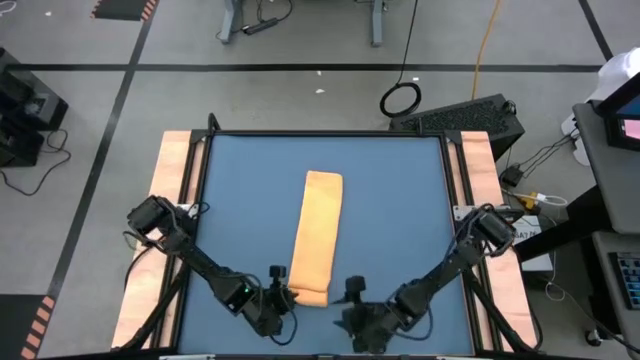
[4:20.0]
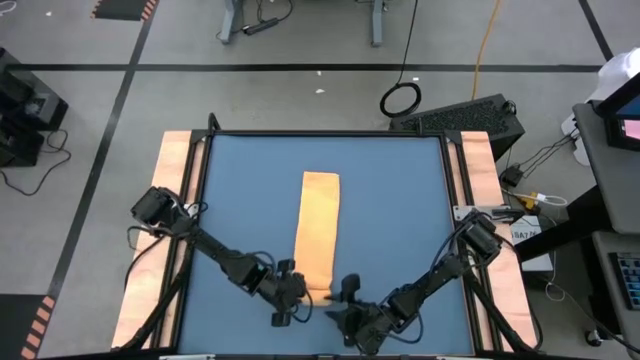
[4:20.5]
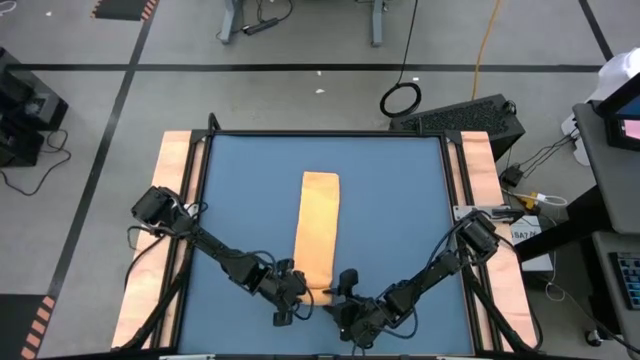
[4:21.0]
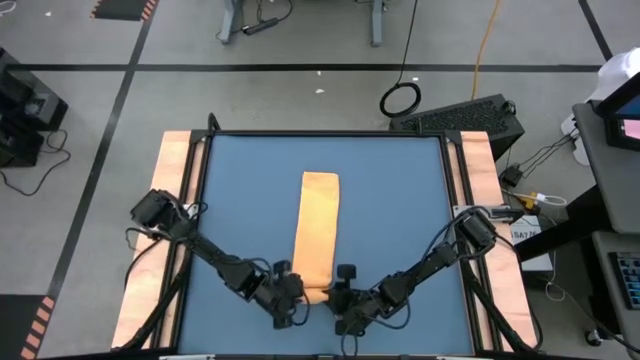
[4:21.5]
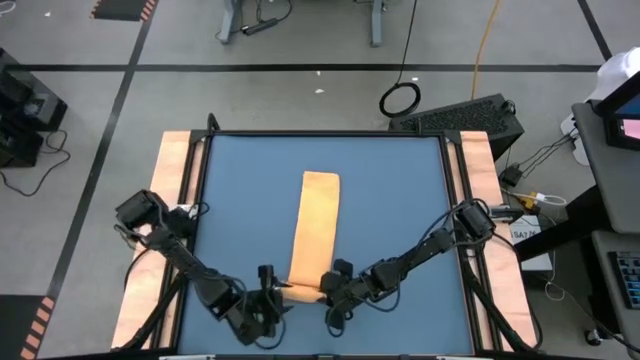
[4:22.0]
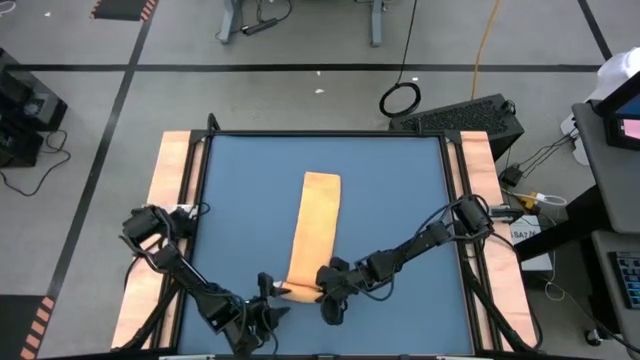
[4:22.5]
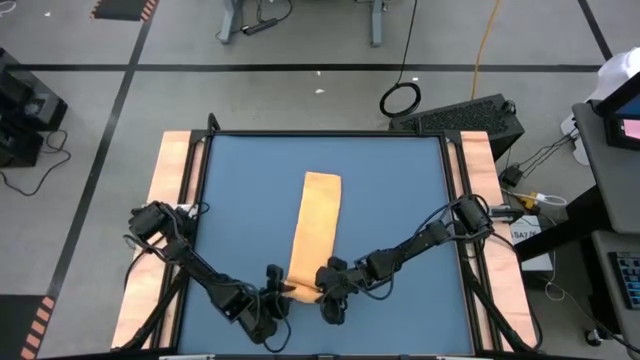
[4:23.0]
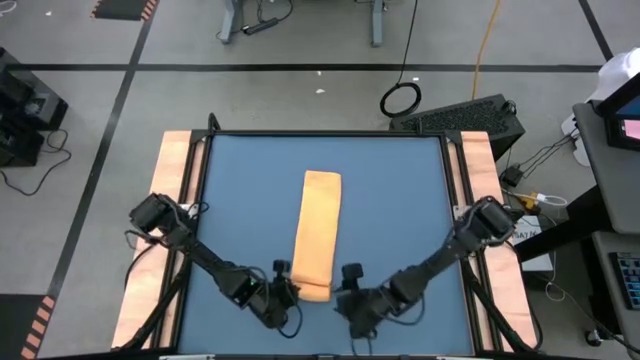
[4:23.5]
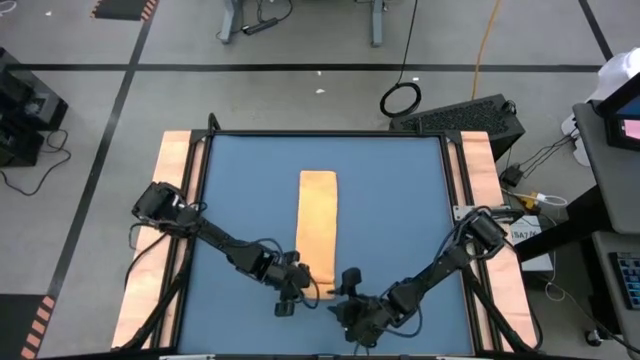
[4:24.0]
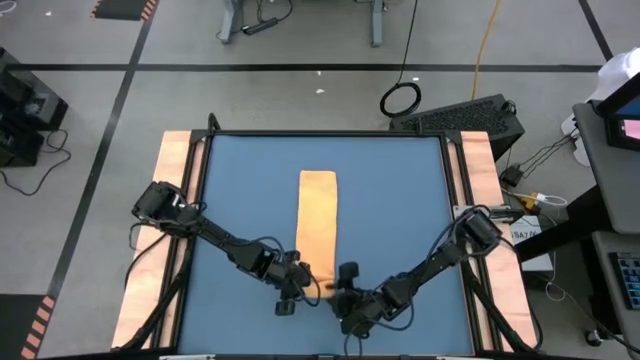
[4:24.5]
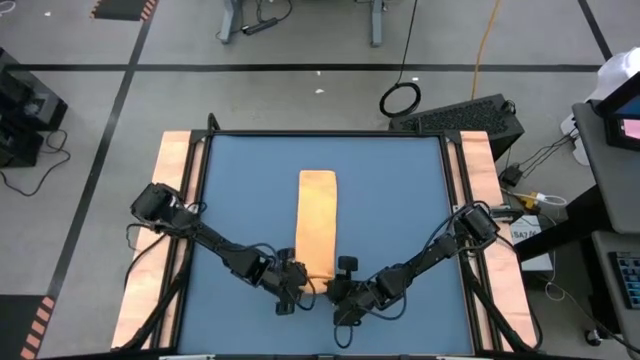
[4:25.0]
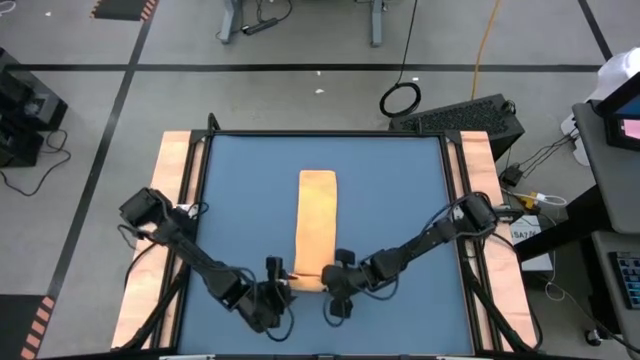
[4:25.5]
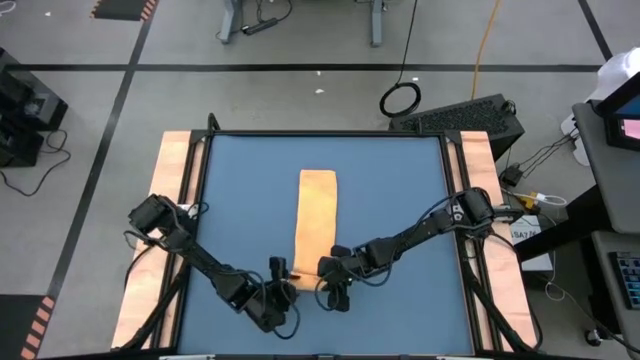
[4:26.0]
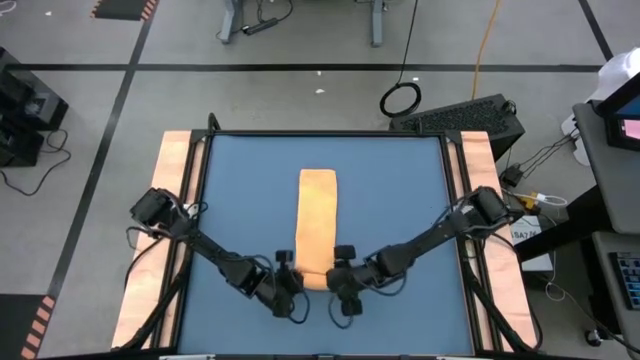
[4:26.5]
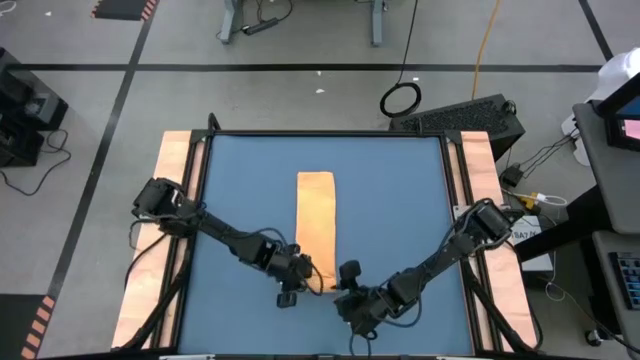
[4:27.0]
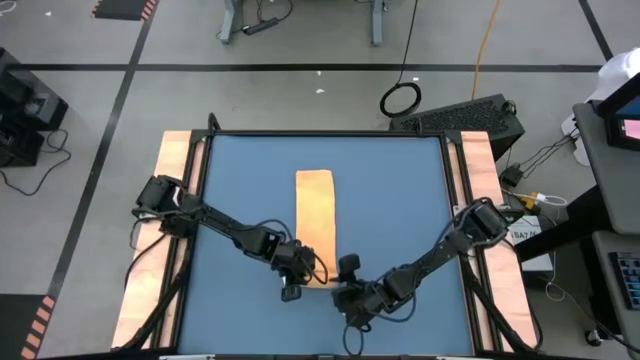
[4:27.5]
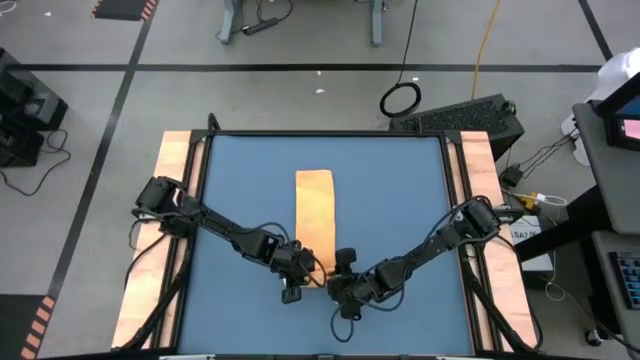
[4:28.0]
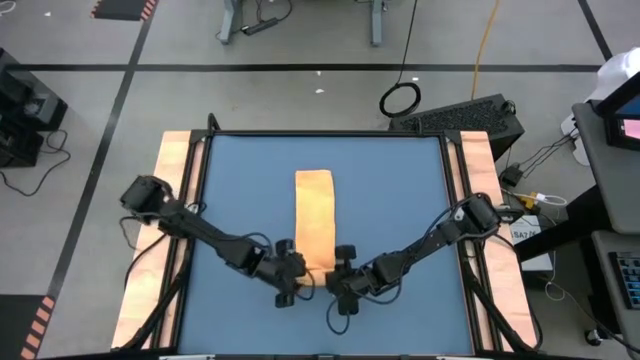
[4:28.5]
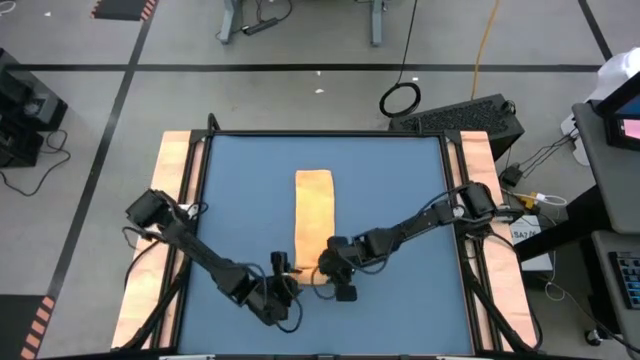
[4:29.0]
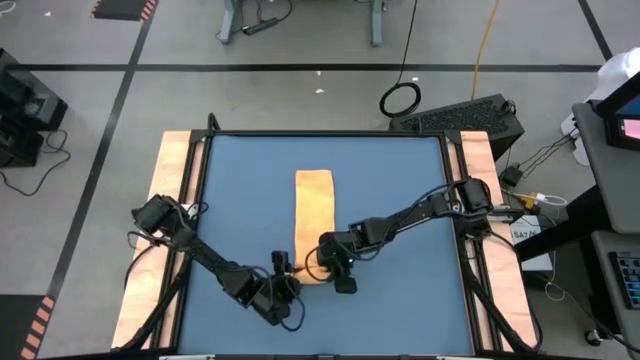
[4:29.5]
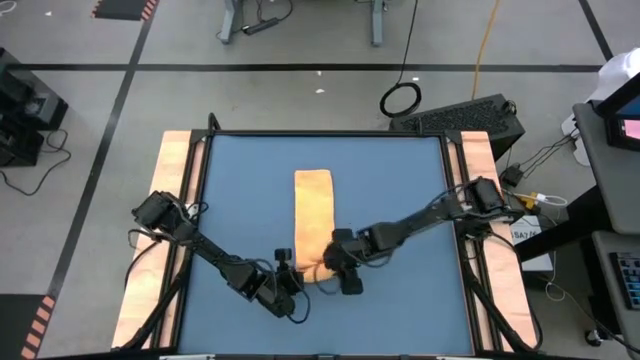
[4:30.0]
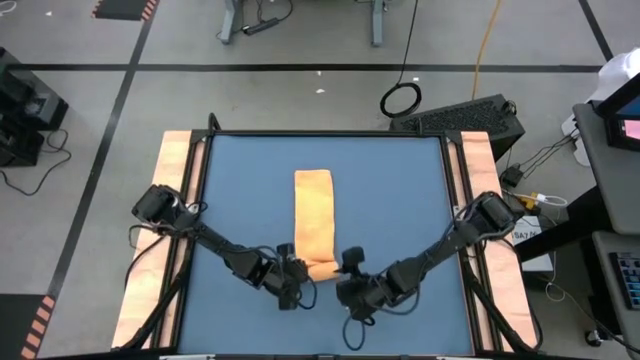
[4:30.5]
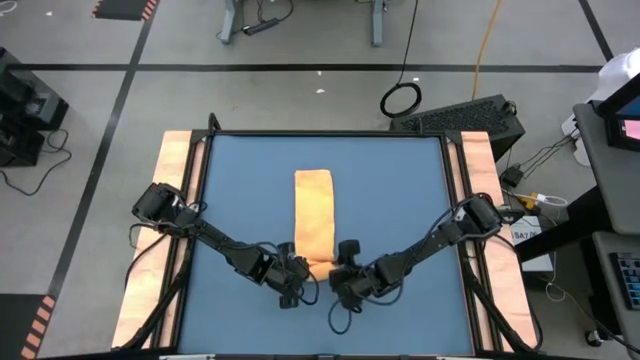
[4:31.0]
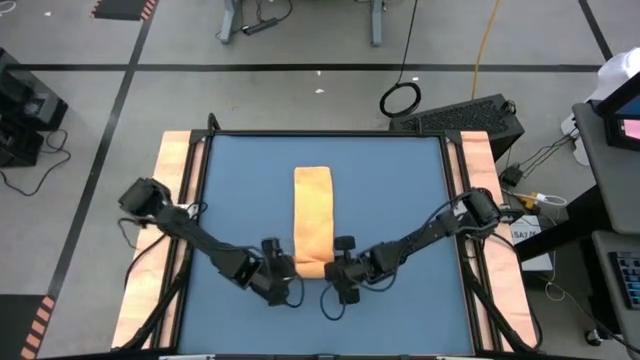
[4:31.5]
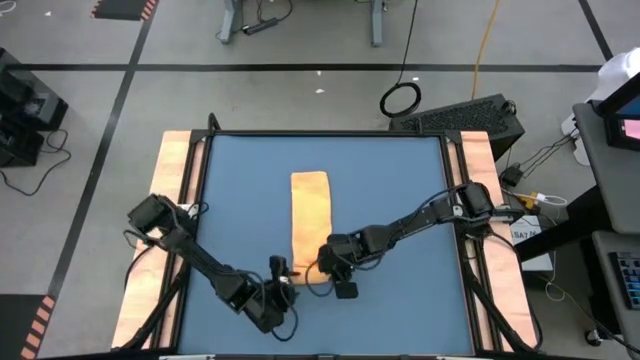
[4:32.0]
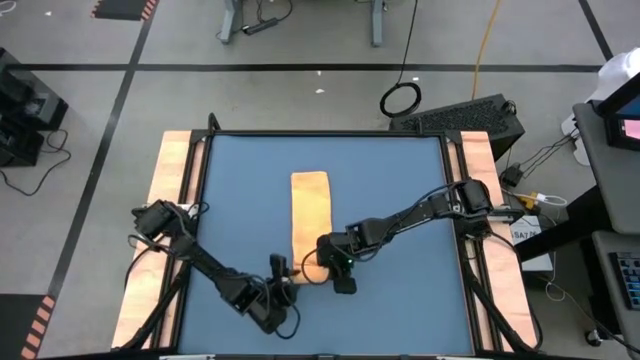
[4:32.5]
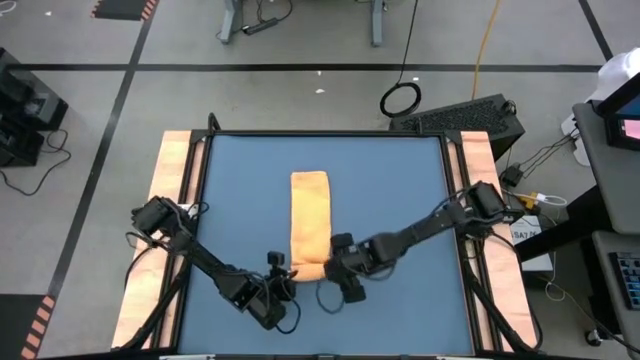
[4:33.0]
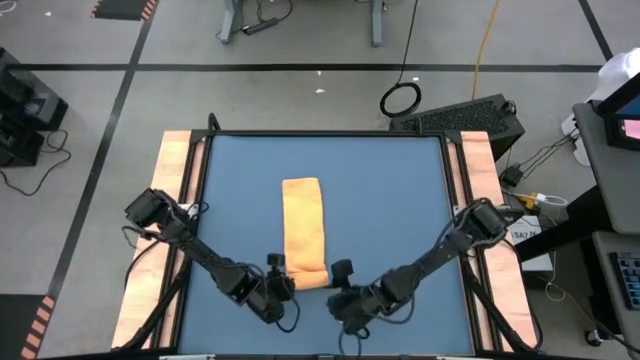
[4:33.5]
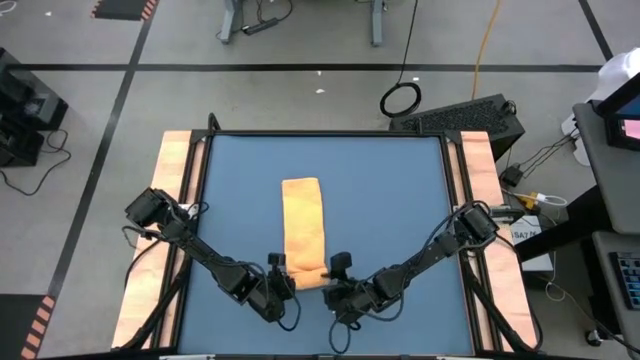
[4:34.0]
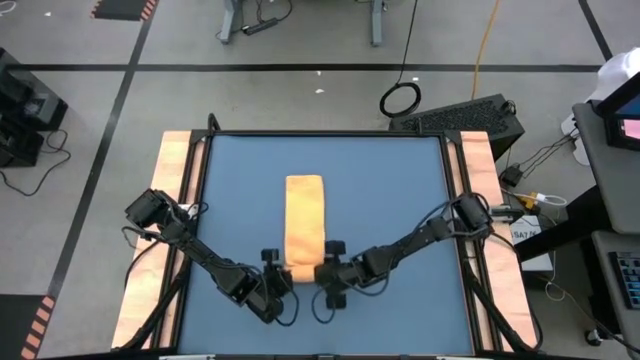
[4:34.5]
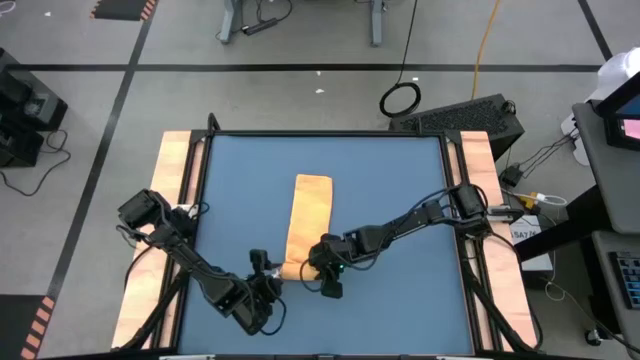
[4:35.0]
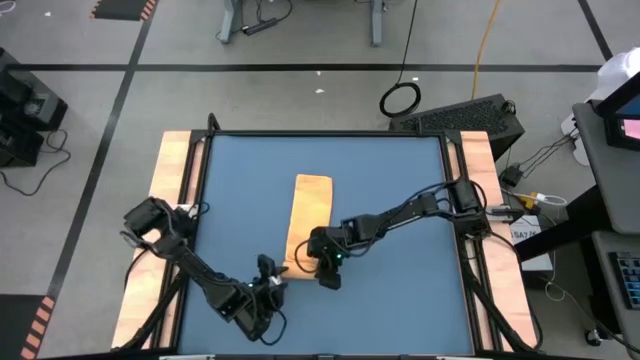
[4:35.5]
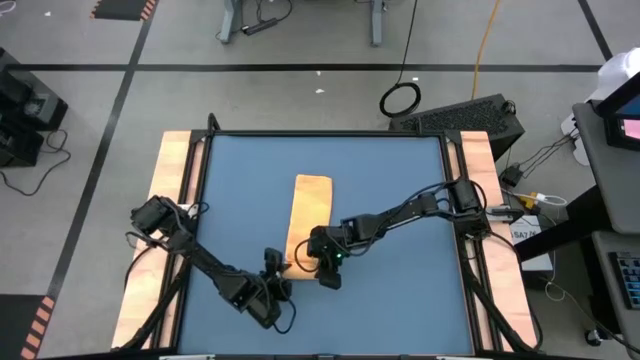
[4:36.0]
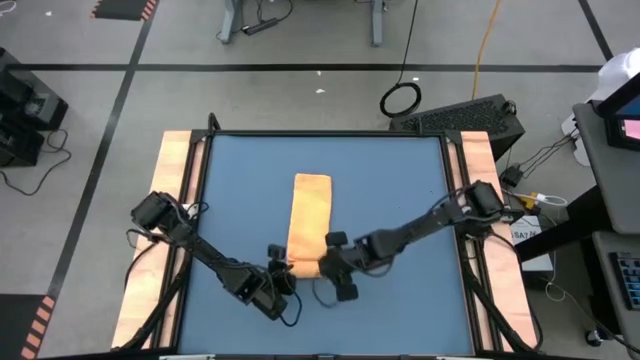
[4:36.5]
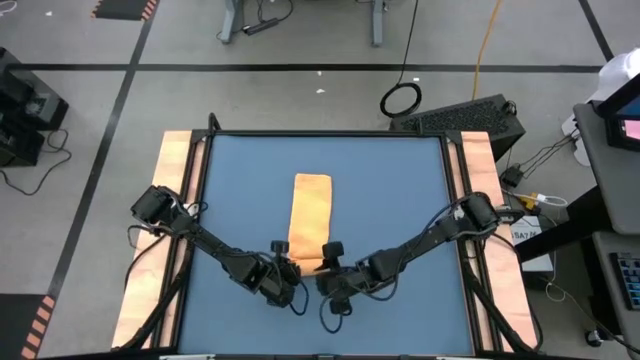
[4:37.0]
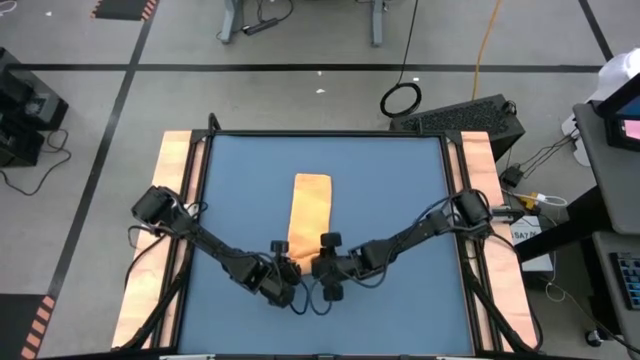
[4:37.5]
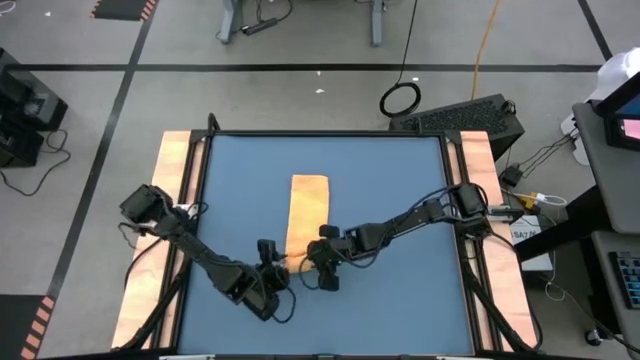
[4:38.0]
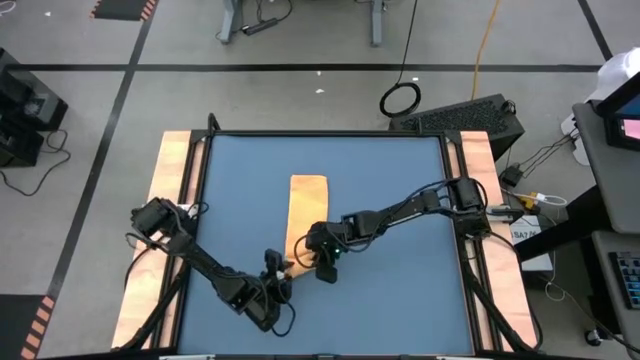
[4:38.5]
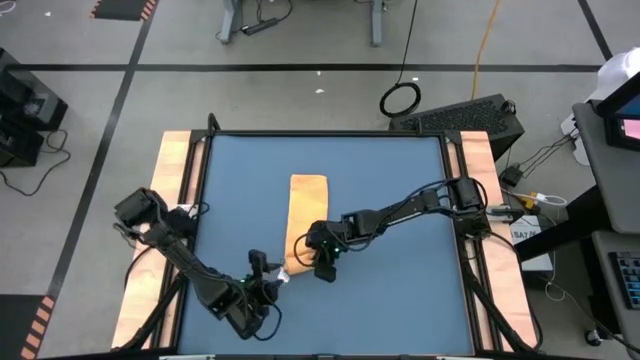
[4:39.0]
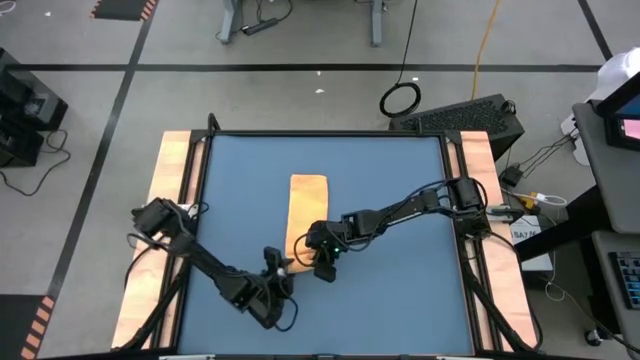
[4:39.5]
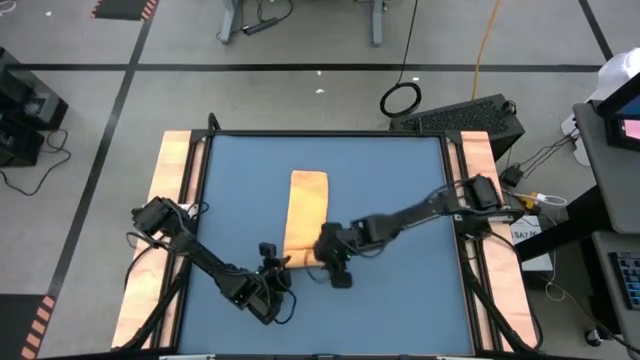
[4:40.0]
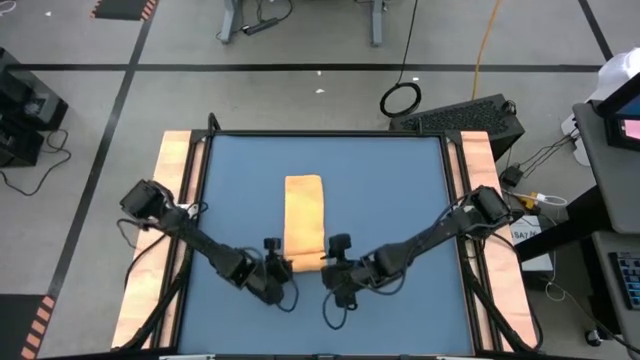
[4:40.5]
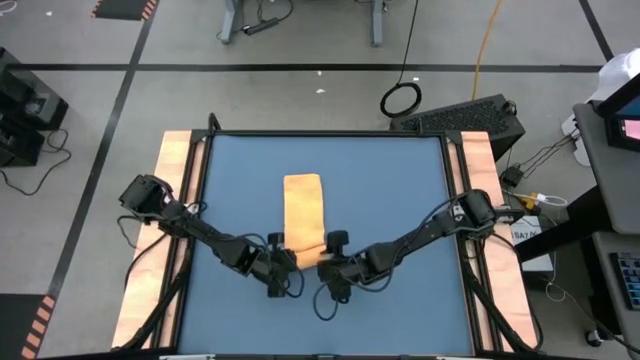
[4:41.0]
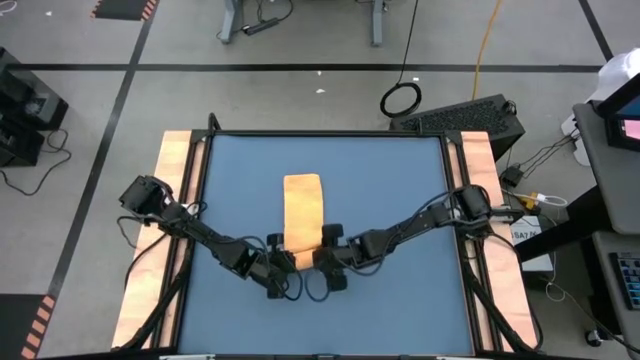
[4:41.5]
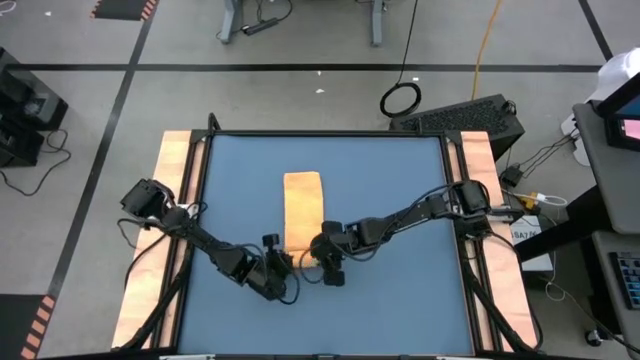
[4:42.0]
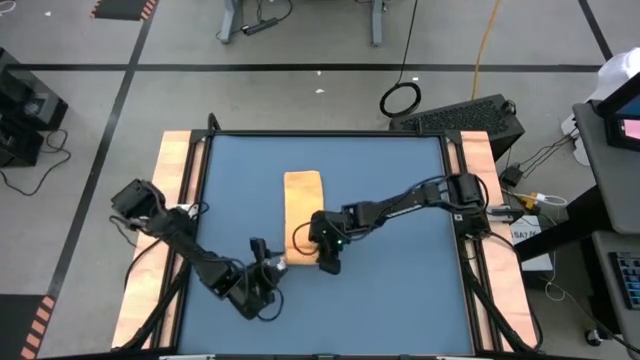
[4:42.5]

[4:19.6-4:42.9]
Task: Roll towel into tight, uniform cylinder
Roll the orange microfiber cloth
